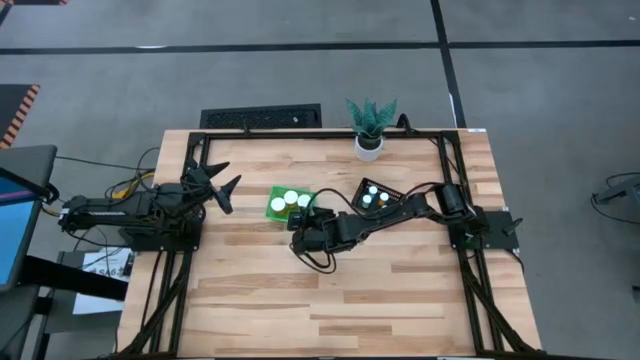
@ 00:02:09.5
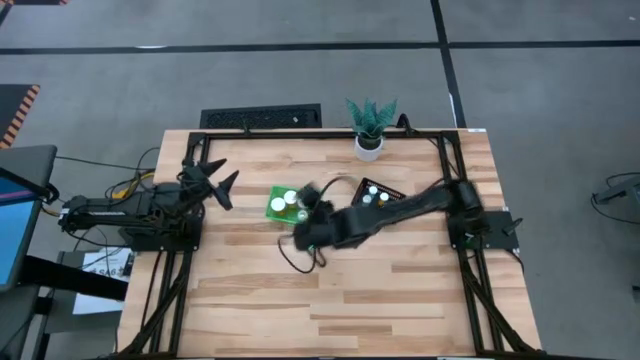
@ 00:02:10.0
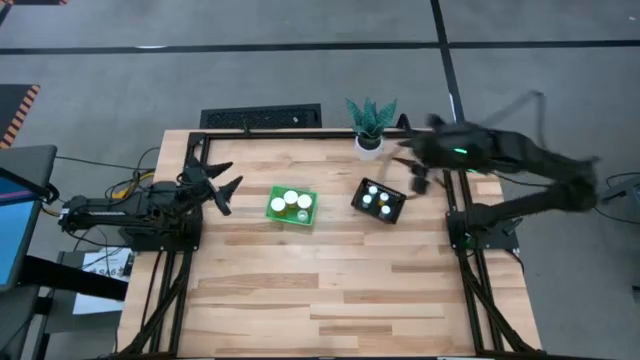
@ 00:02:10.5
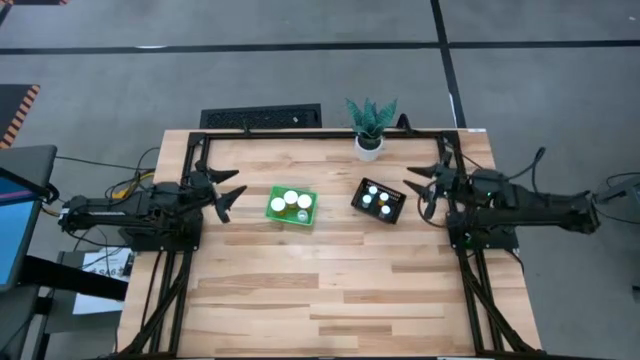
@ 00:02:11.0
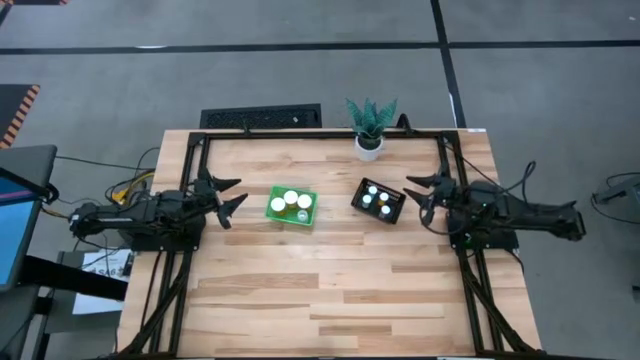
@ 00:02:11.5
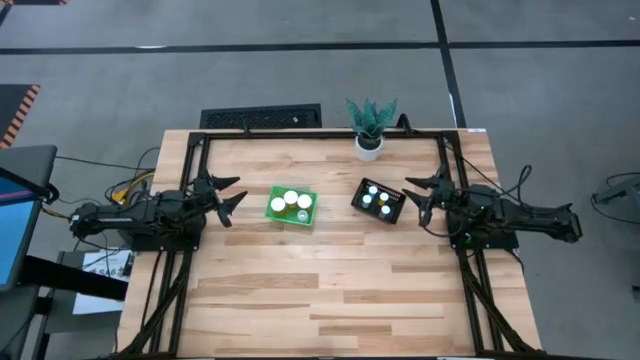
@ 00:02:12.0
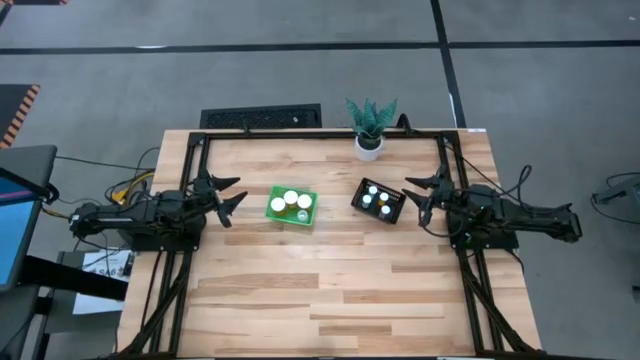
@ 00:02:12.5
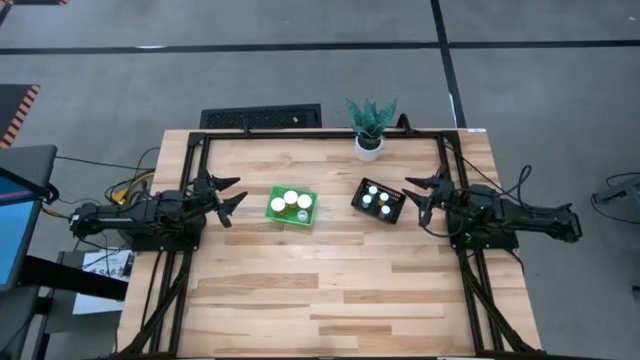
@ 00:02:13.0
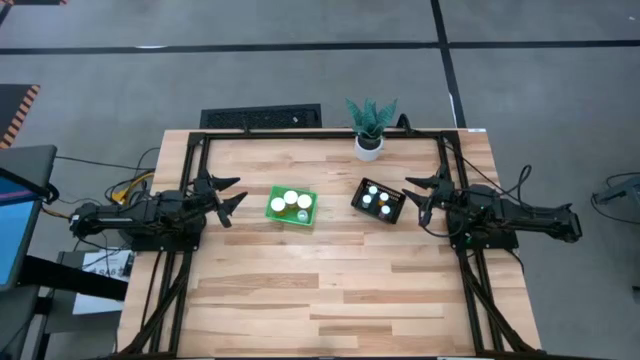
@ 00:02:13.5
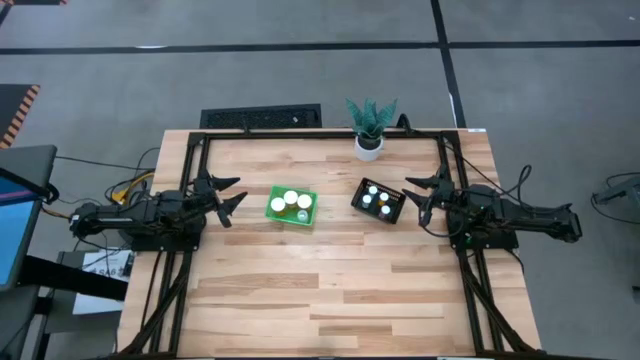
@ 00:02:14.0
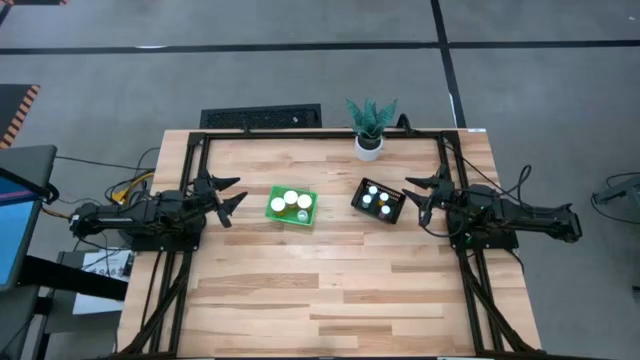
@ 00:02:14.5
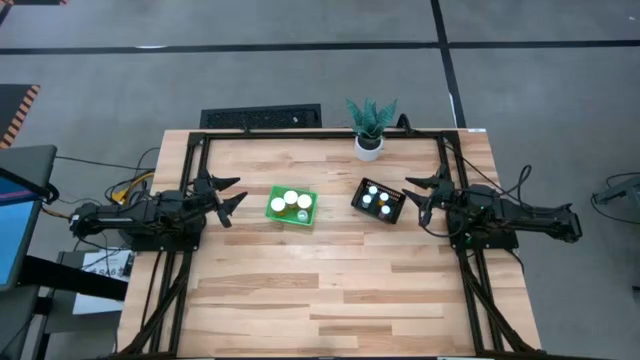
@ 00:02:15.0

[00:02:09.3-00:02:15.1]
Task: Pick and place medicine bottles into bin by pill shape (circle, oval)
Return to Home Position

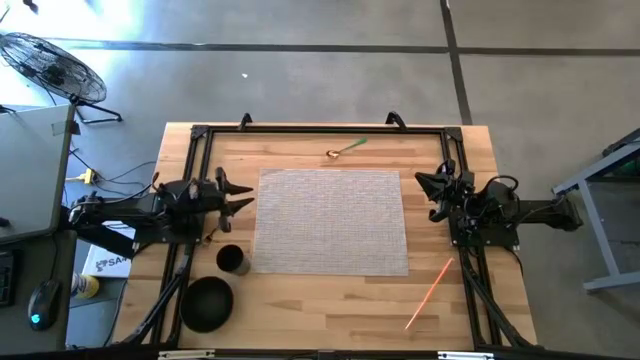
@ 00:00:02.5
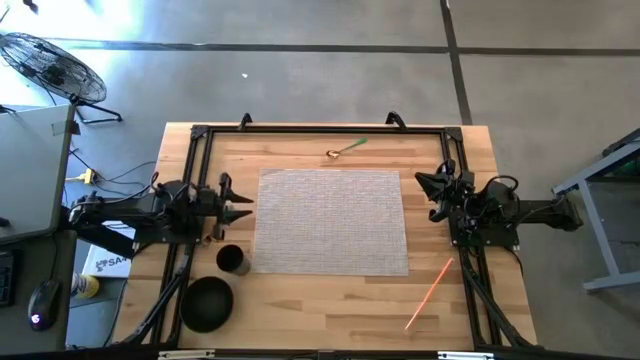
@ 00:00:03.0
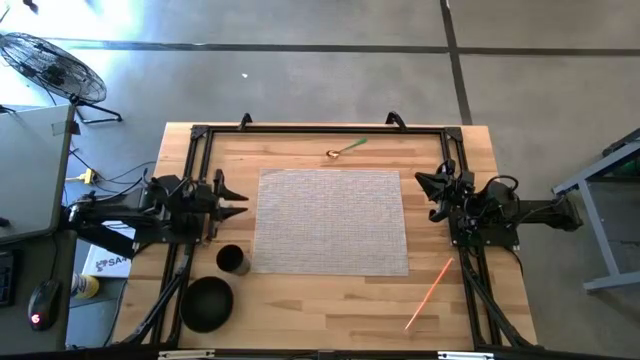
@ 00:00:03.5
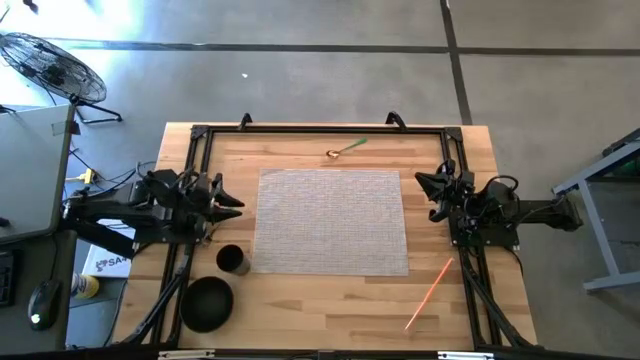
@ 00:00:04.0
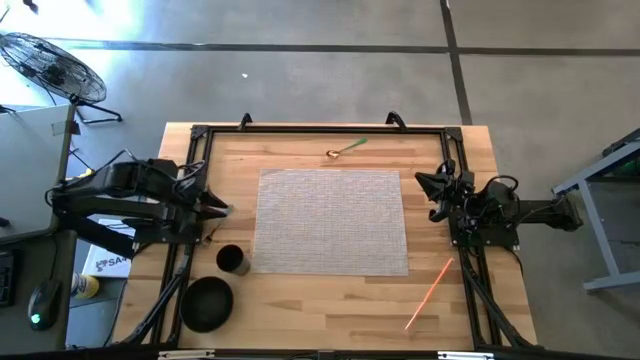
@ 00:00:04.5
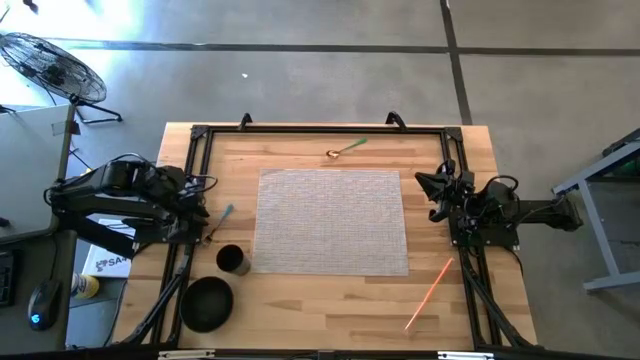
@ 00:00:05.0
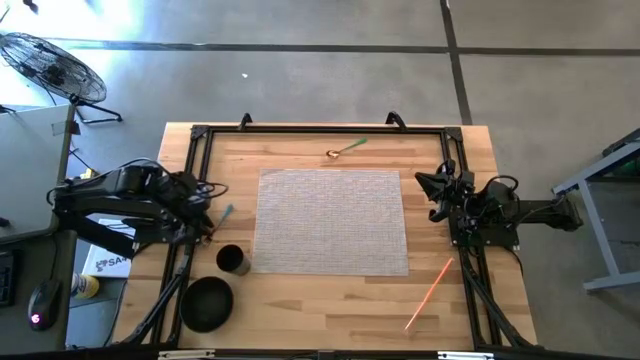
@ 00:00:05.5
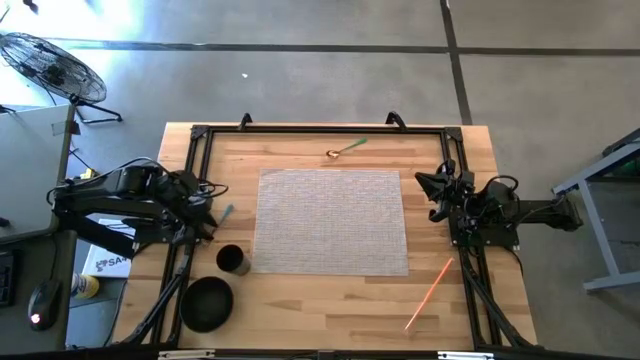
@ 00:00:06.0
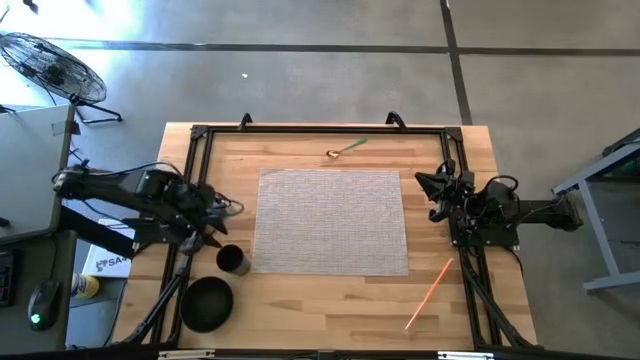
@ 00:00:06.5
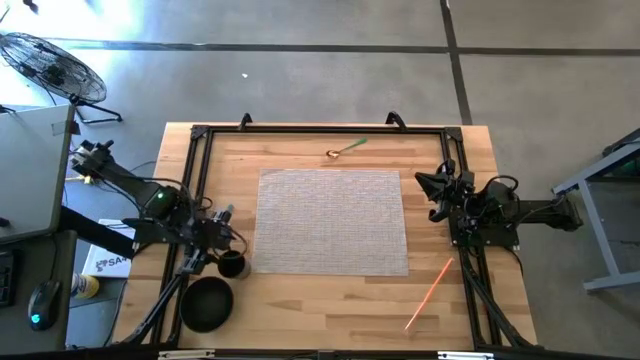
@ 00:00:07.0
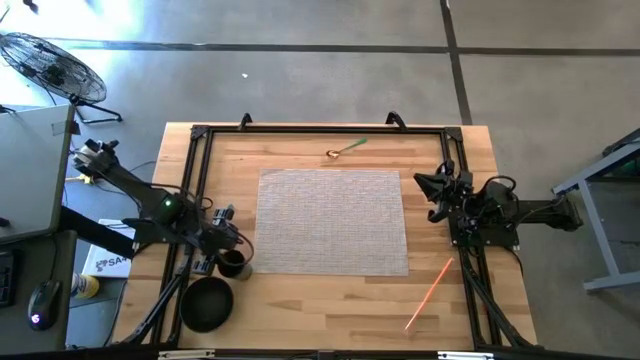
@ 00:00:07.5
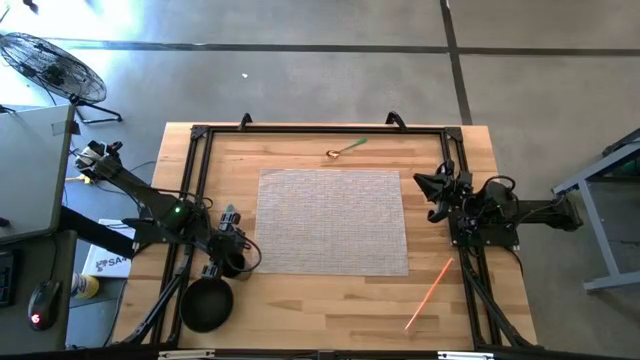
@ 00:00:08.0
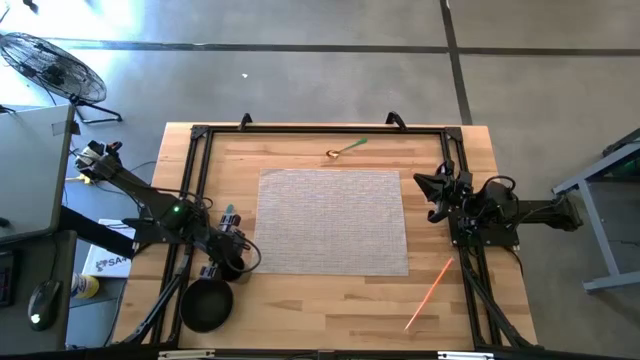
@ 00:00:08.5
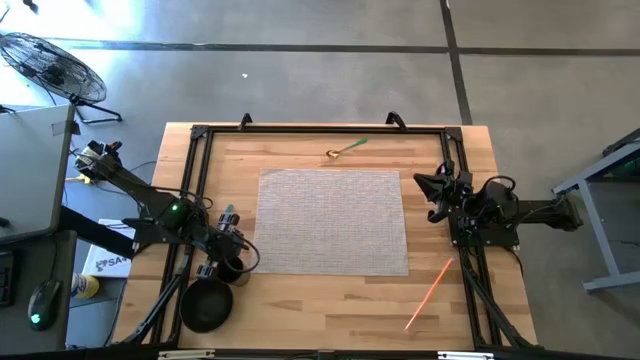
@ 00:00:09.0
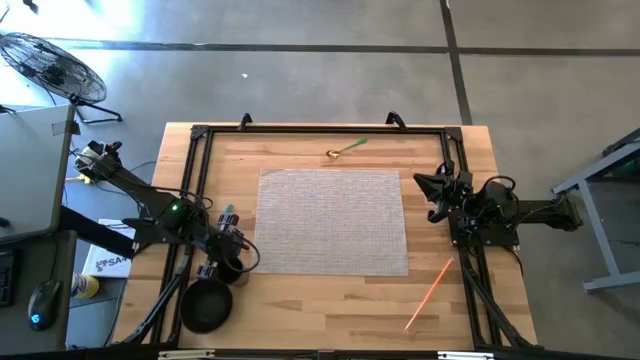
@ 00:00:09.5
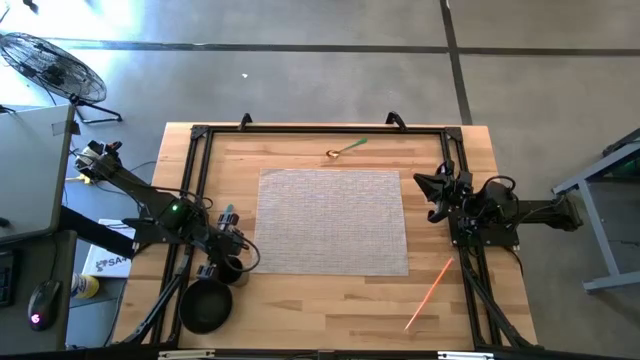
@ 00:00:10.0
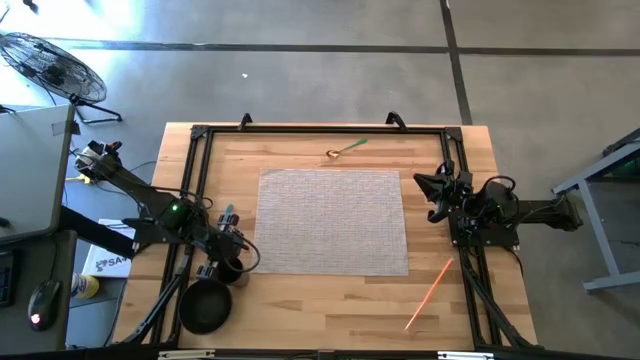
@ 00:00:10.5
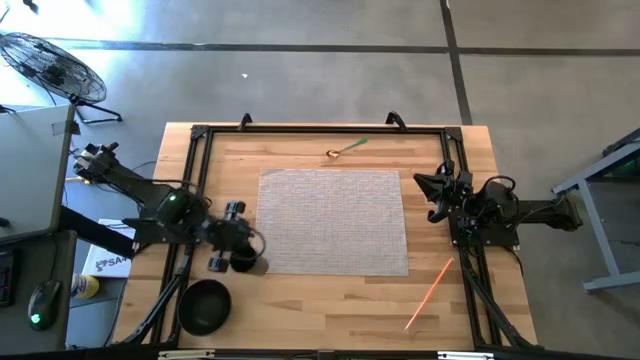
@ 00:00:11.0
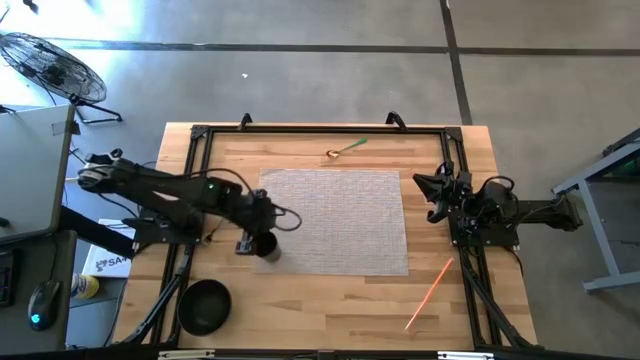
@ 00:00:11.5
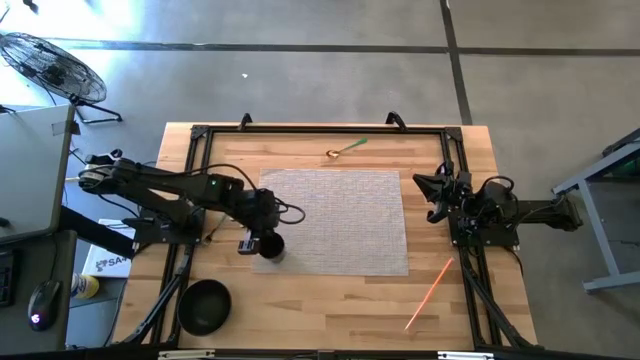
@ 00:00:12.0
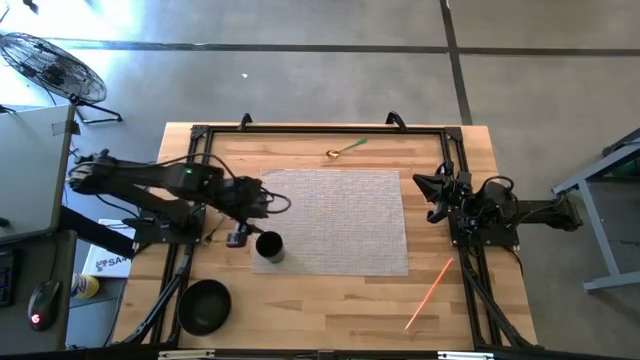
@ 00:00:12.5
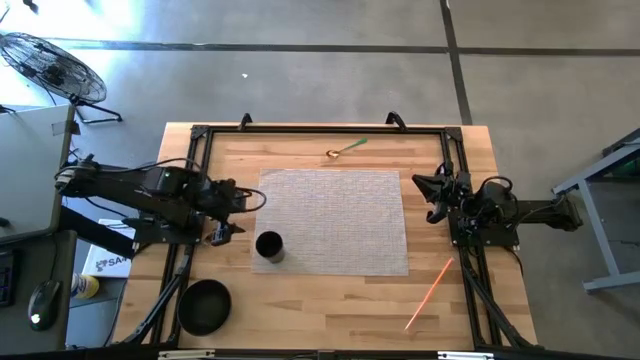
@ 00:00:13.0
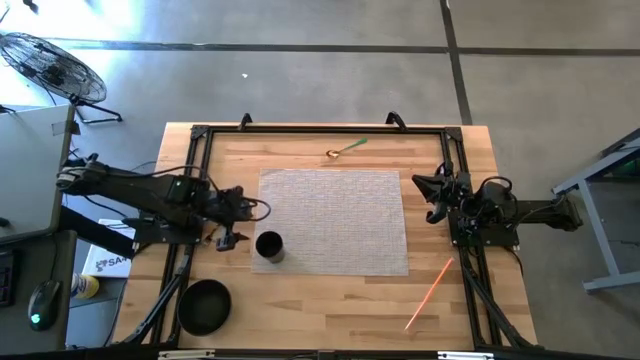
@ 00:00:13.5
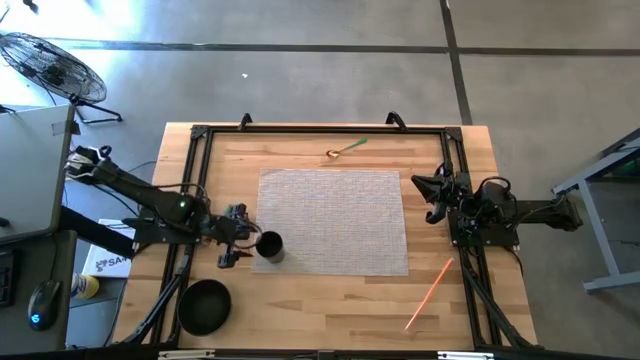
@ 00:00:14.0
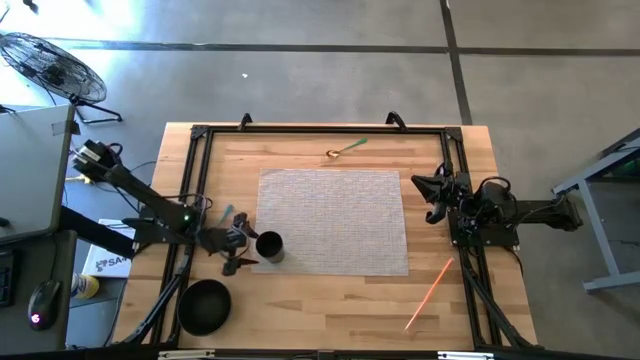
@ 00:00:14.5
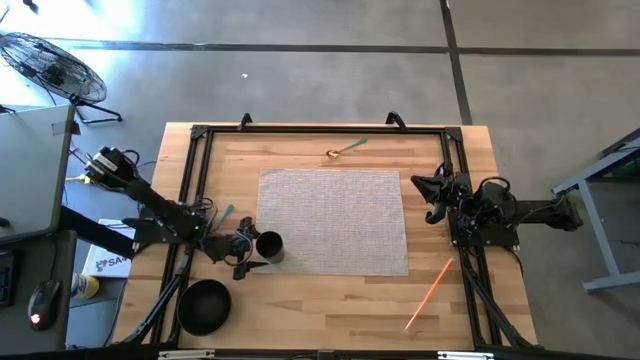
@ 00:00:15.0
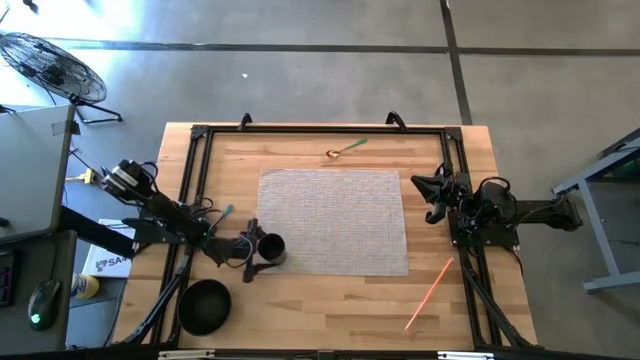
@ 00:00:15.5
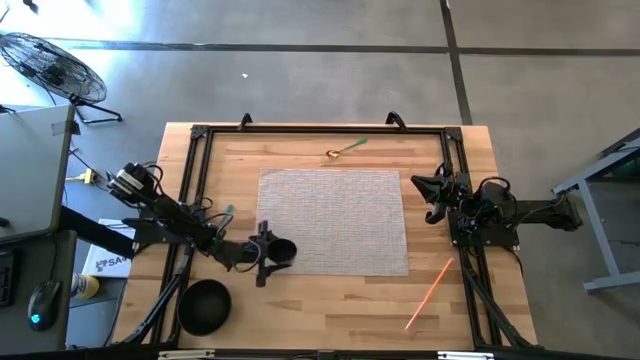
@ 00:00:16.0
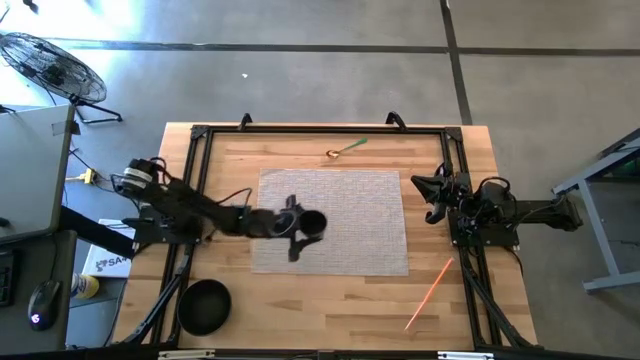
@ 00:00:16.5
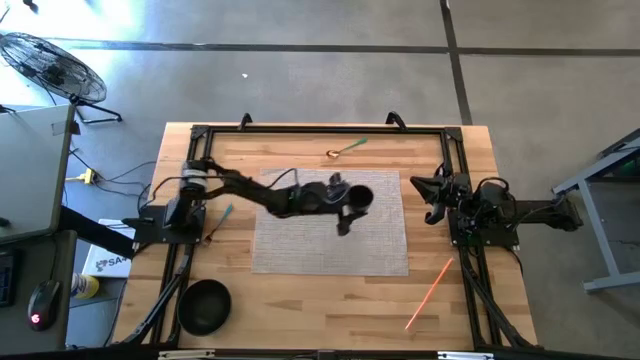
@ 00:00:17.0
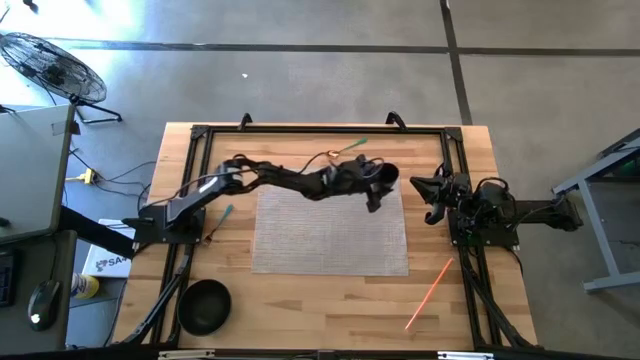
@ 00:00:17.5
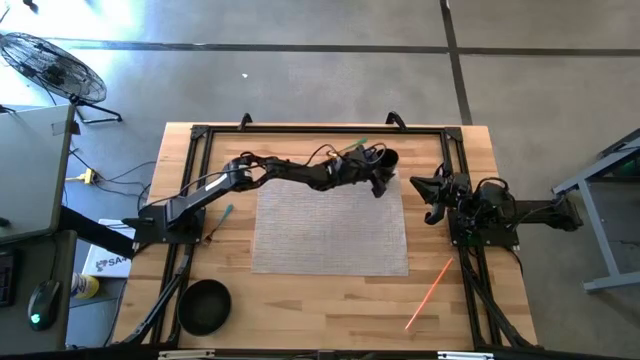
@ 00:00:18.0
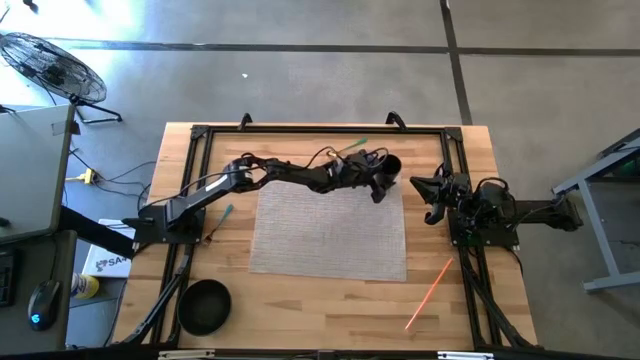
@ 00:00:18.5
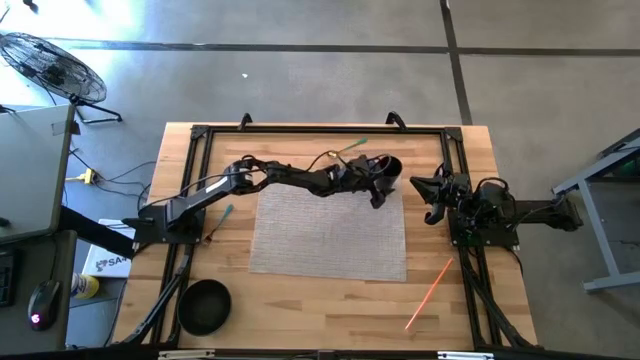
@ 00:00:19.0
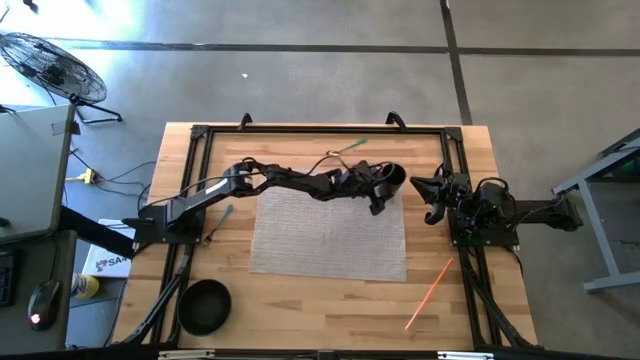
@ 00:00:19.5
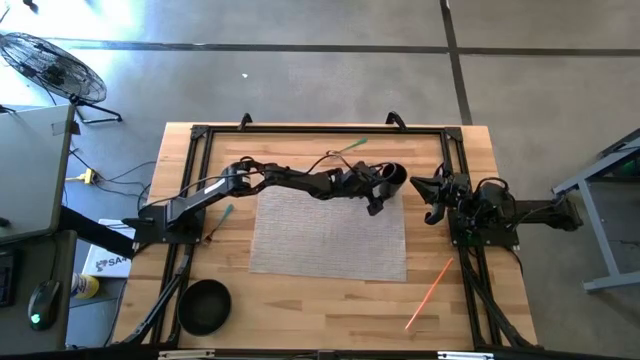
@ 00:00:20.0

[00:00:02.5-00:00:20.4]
Task: Pick & Place Utensil
Put the black cup on the gray mat
